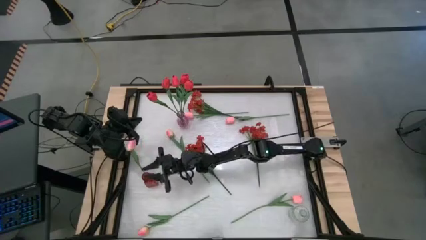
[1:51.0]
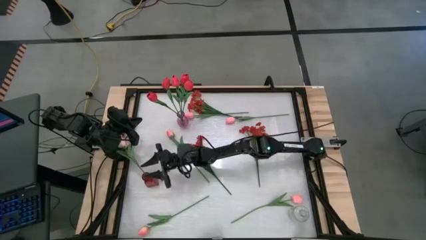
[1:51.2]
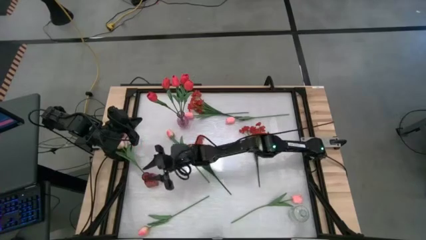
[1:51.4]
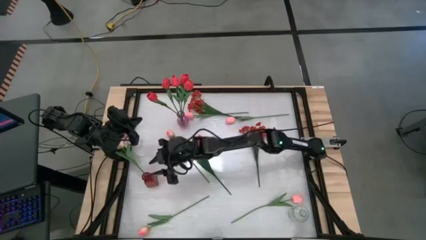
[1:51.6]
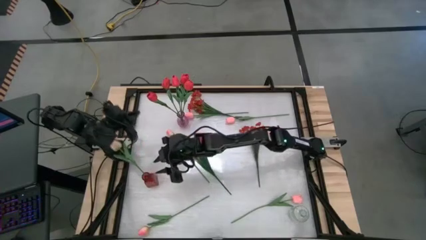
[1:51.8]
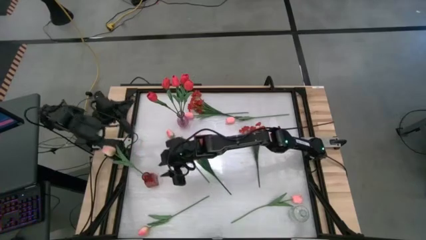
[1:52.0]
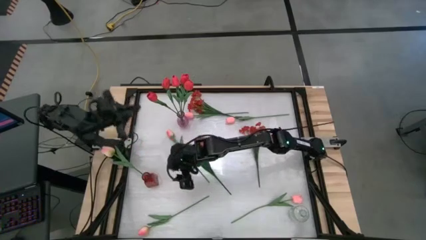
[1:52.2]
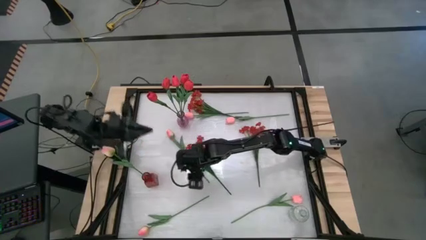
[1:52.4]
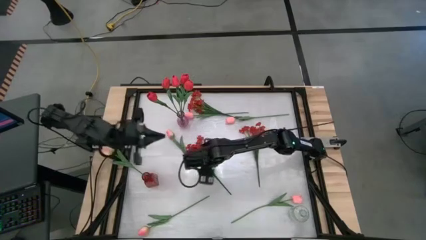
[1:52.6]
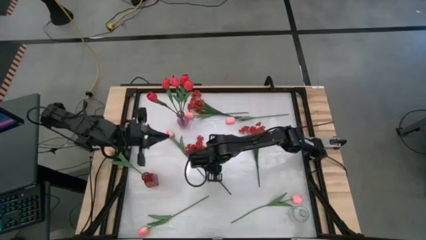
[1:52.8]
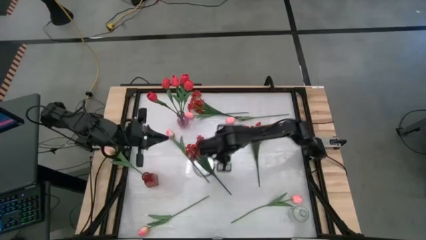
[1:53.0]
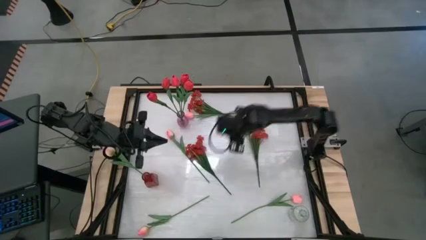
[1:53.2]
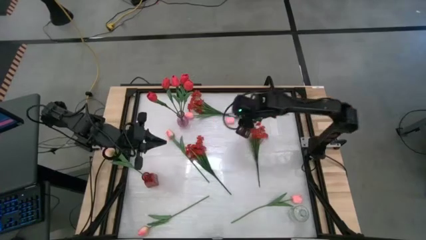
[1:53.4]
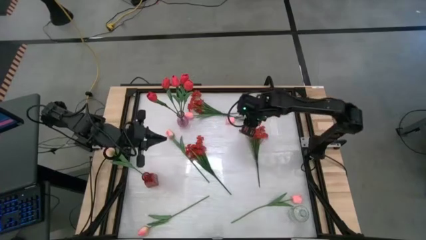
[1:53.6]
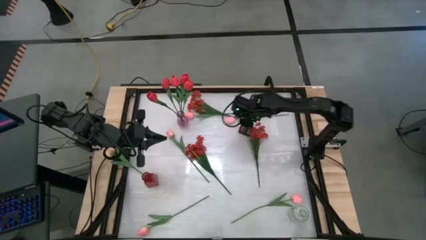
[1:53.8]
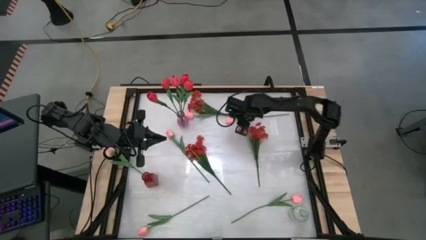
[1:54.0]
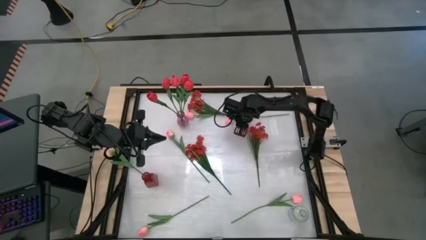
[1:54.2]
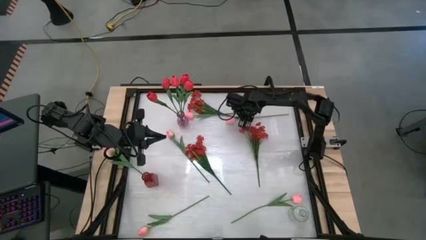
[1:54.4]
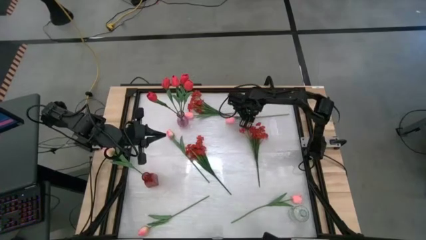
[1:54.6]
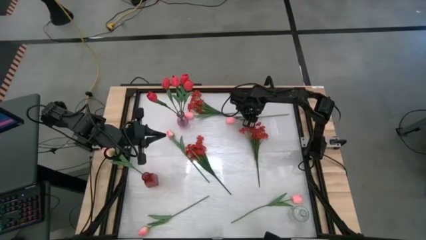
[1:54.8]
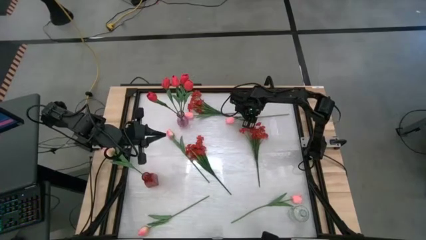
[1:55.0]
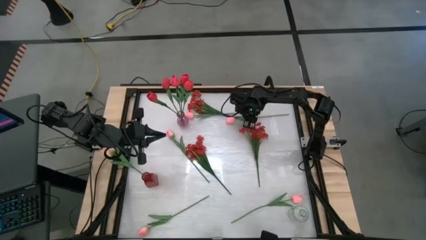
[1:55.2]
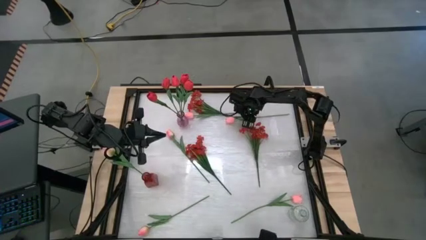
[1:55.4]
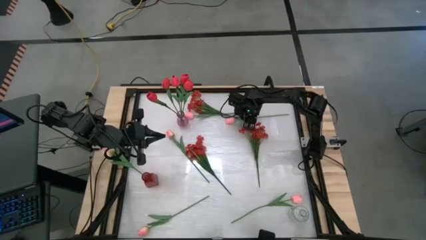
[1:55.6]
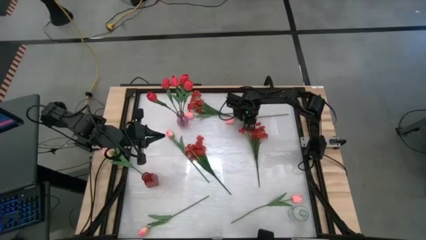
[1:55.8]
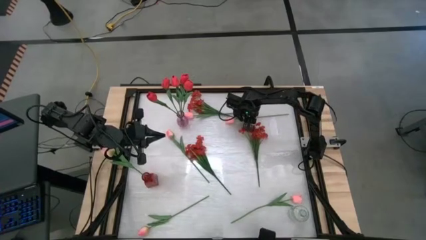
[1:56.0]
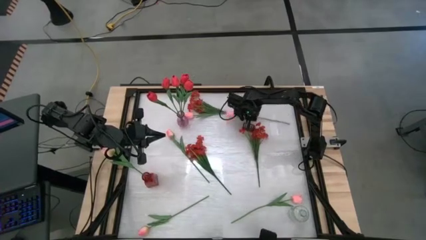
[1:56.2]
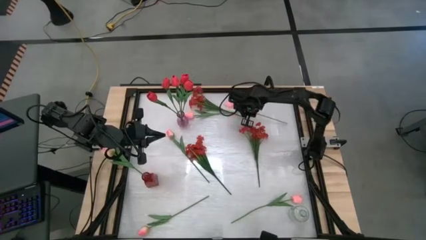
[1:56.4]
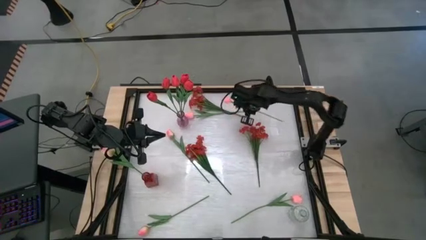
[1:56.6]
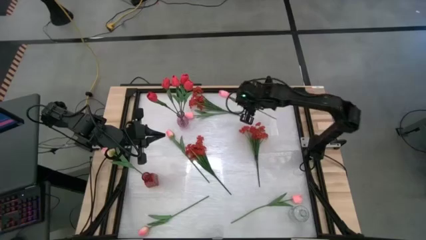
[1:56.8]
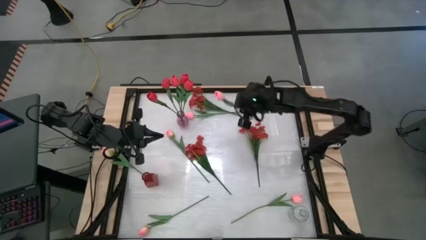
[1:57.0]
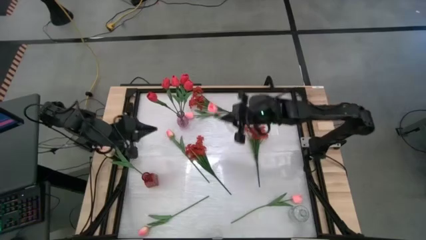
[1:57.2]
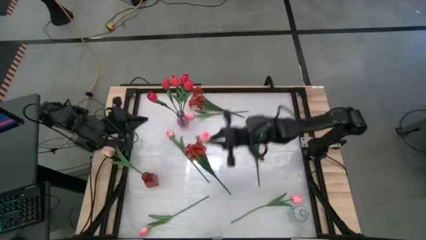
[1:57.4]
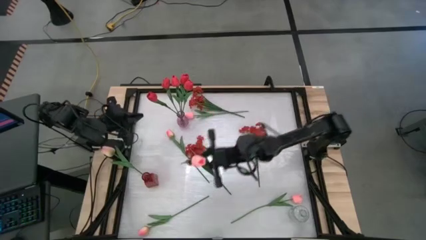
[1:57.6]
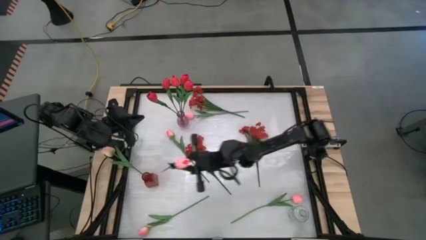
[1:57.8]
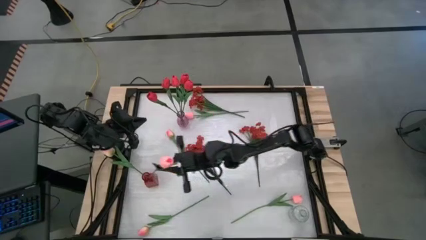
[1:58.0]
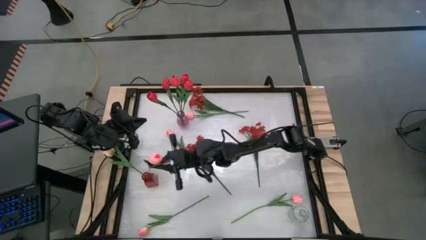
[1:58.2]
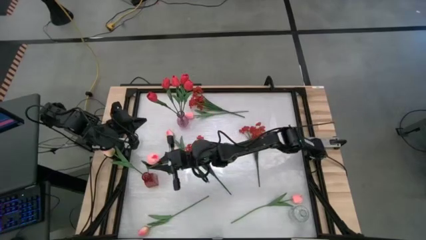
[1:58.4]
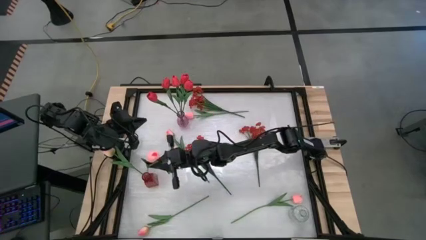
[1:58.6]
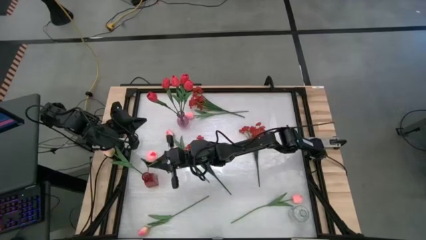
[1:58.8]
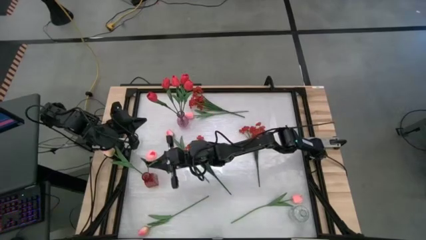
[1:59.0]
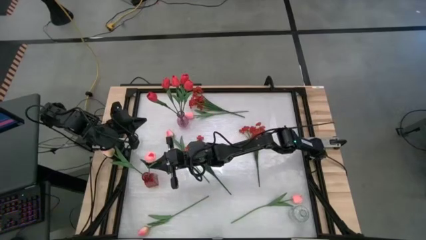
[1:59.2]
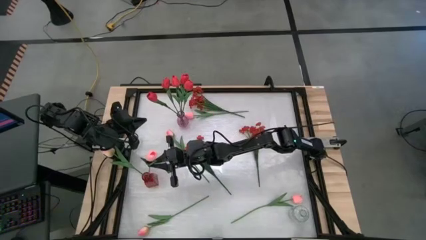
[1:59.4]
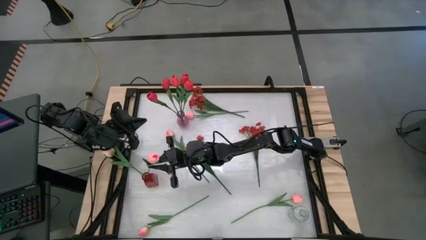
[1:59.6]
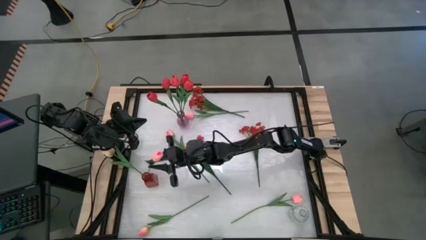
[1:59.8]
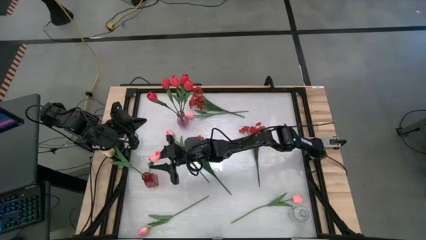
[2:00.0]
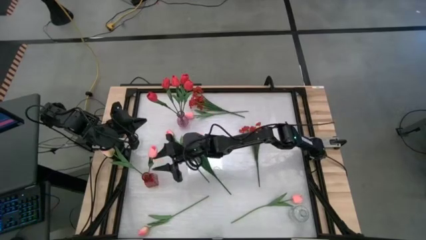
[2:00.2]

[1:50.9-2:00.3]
Task: Sort flowers into vase by color
Put the pink tulip into the red vase

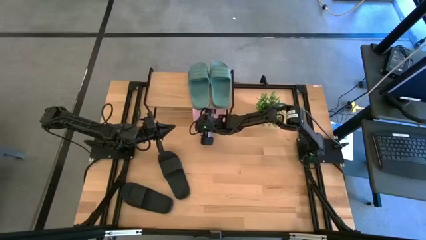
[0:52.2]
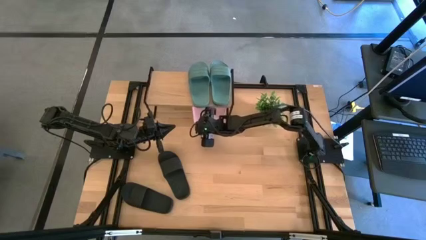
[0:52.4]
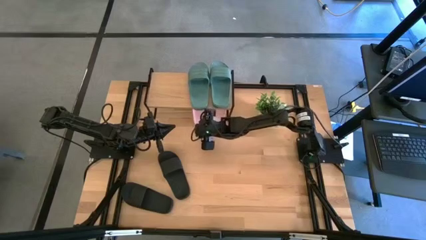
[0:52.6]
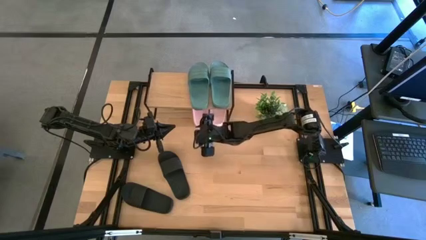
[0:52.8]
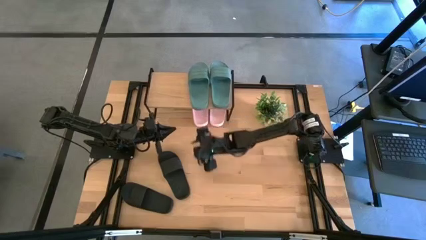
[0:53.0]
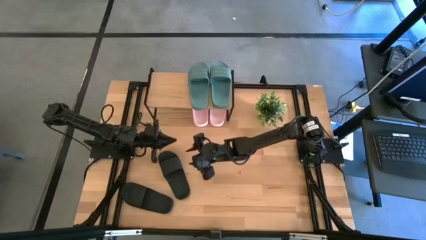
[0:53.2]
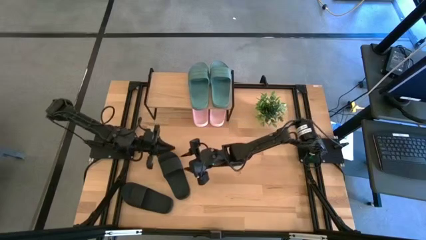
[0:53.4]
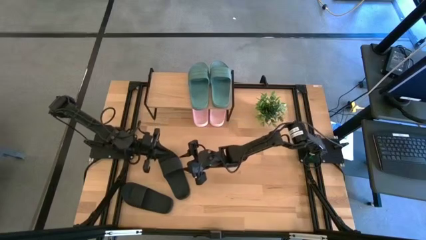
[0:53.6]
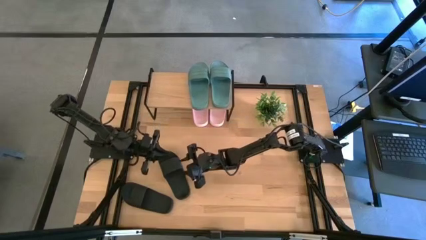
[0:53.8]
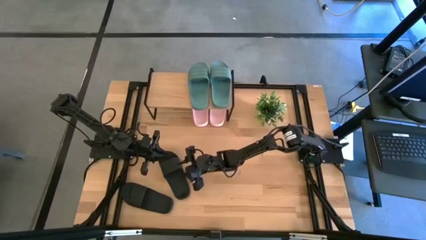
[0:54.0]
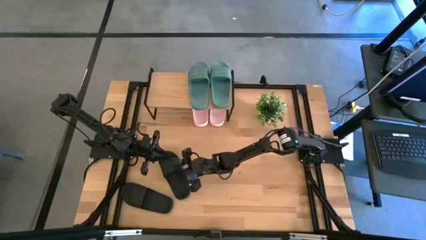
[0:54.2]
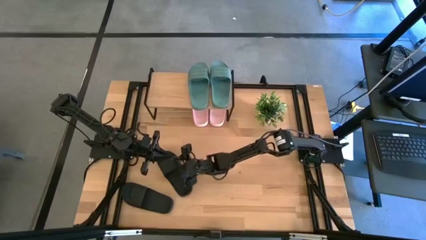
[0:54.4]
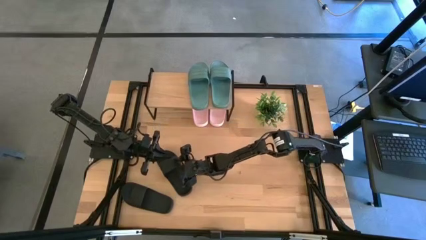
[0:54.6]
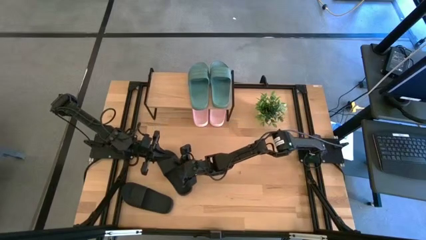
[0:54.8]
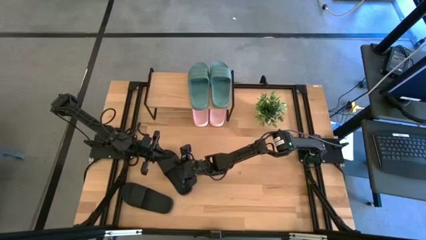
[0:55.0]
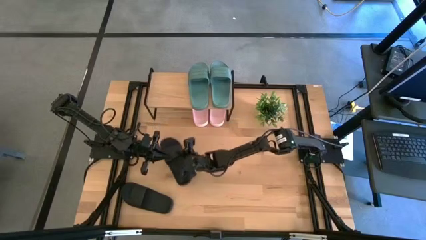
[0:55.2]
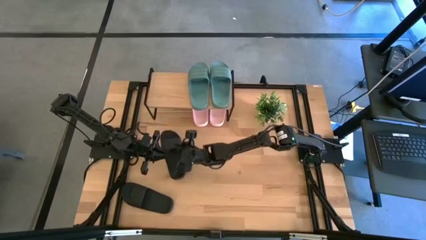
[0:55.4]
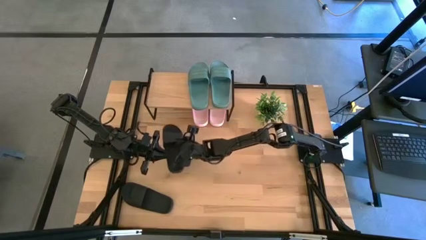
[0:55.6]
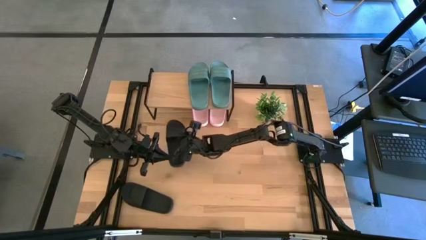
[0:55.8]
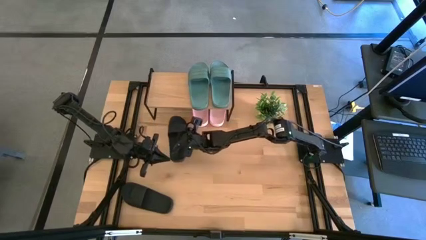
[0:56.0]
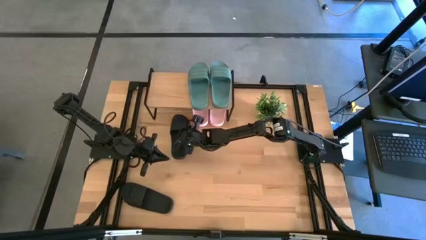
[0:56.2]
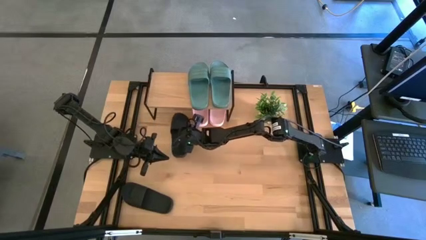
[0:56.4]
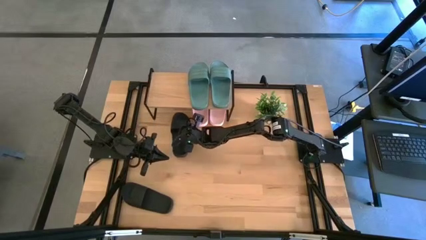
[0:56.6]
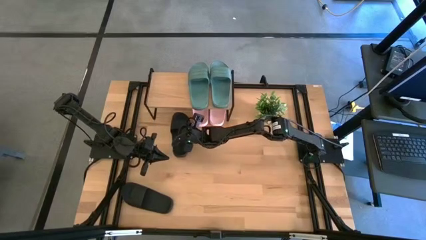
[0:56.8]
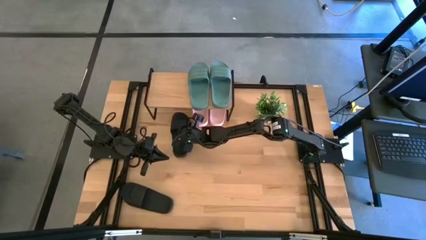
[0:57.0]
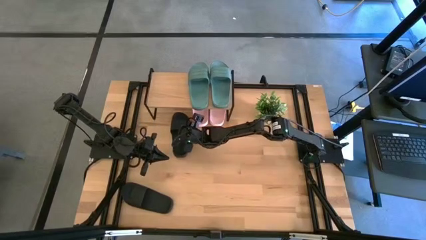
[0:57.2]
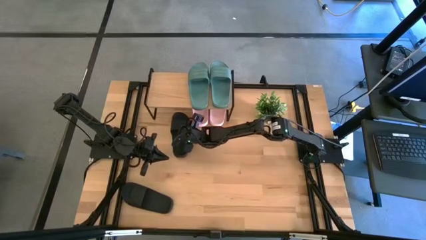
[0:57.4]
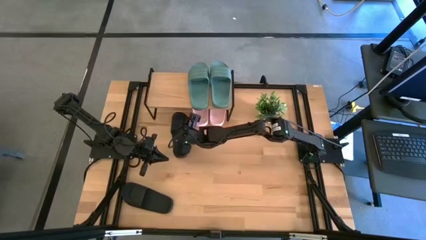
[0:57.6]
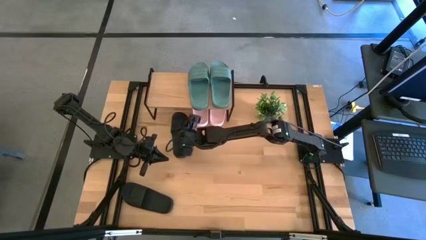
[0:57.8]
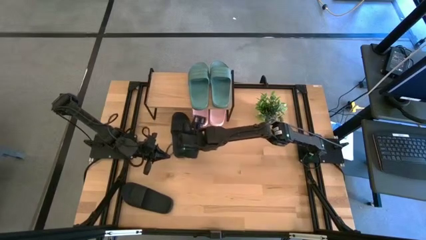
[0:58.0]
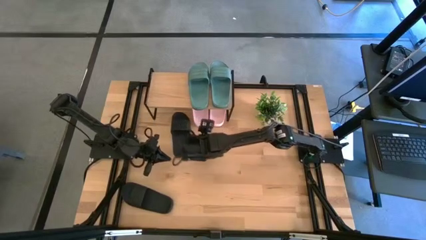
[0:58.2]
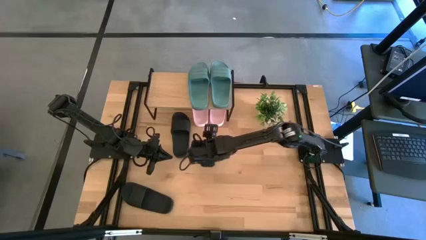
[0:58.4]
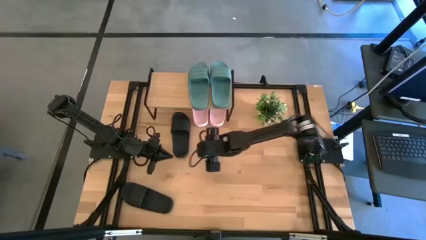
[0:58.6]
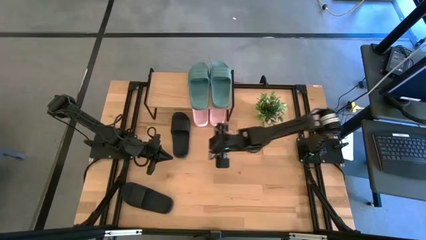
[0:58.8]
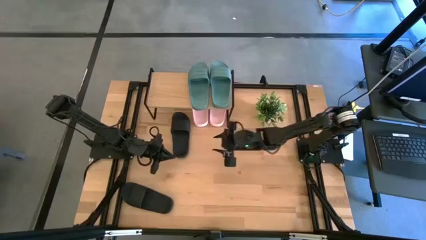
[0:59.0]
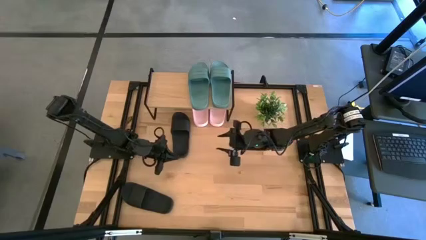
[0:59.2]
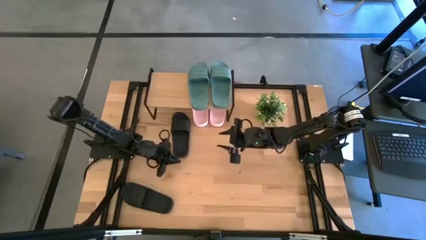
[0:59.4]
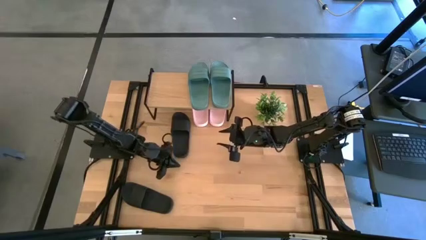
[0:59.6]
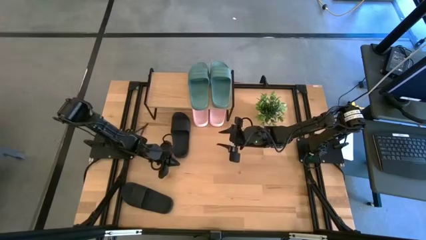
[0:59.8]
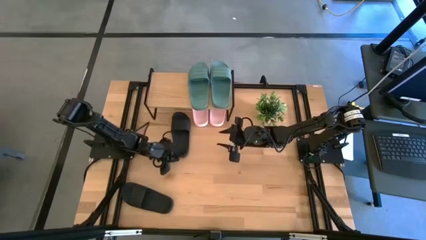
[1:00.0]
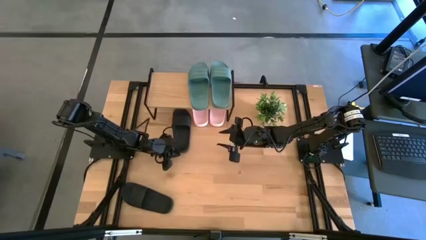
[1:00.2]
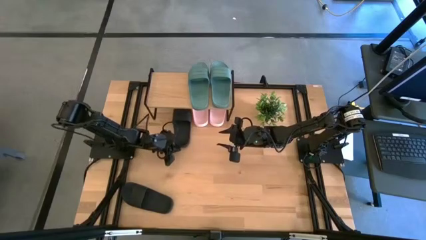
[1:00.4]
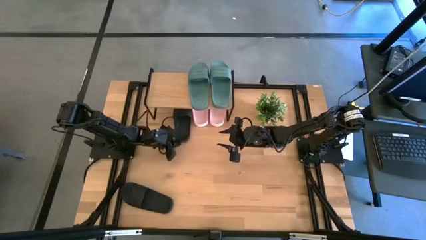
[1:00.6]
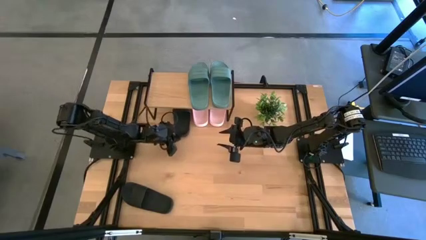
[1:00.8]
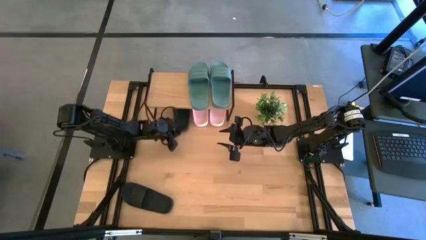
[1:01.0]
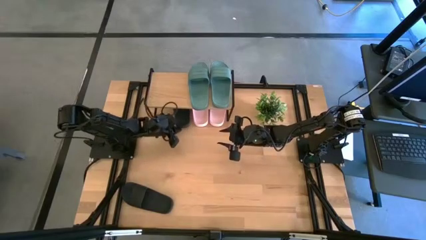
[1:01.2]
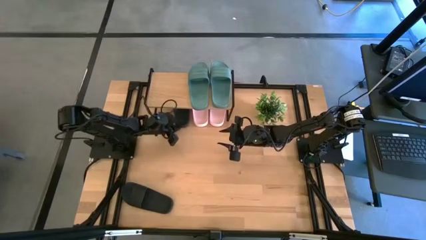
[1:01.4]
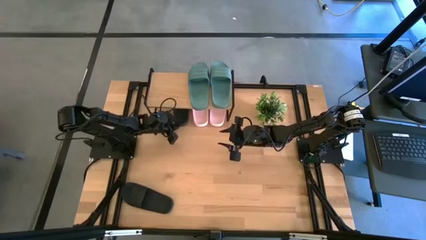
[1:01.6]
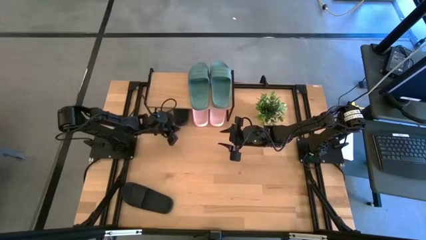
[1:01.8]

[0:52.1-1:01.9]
Task: Pick and place slides into the shelf
Put the right black slide under the shelf
